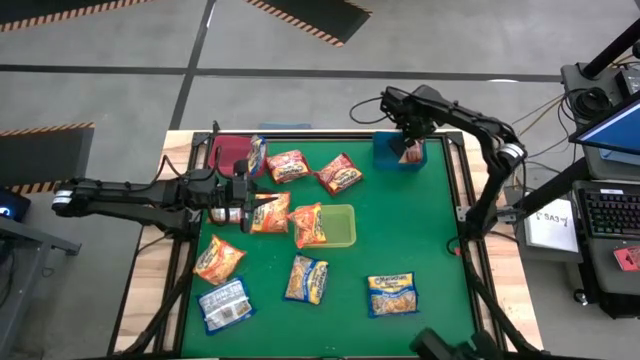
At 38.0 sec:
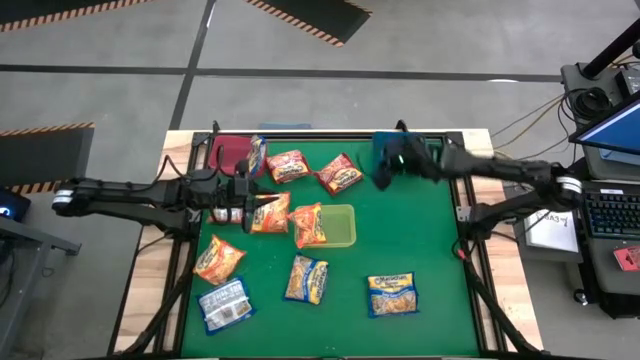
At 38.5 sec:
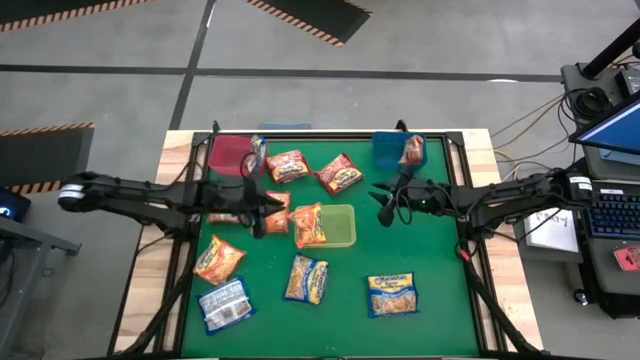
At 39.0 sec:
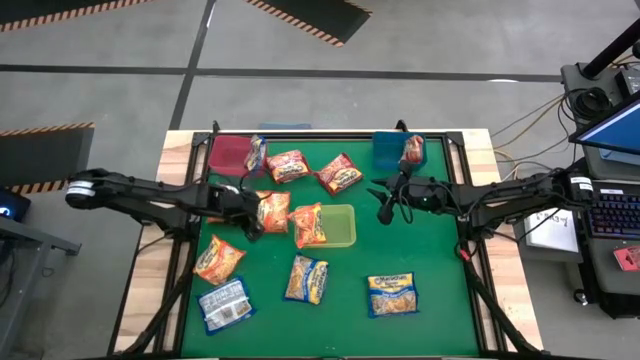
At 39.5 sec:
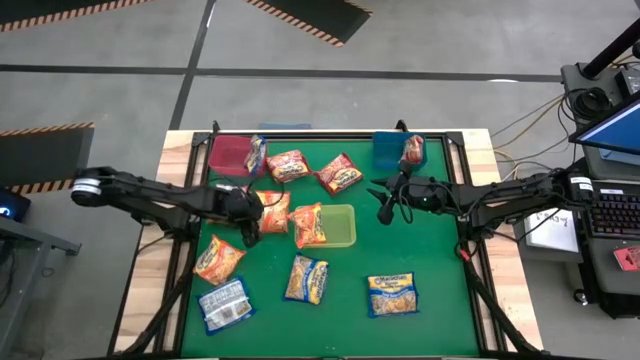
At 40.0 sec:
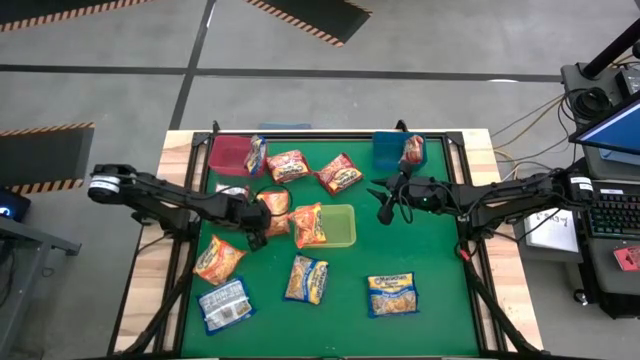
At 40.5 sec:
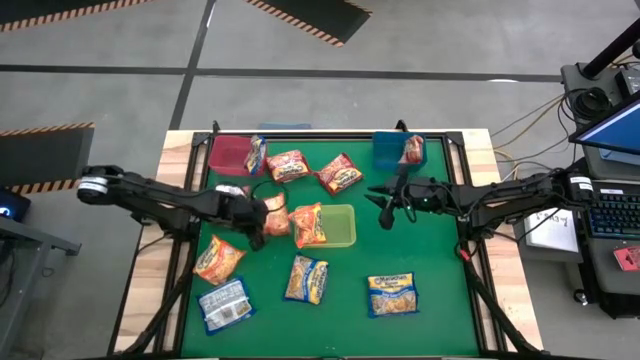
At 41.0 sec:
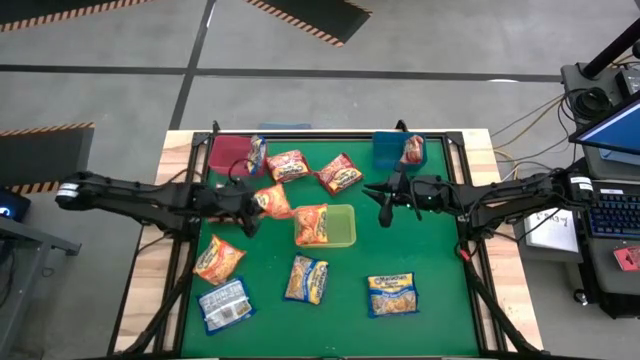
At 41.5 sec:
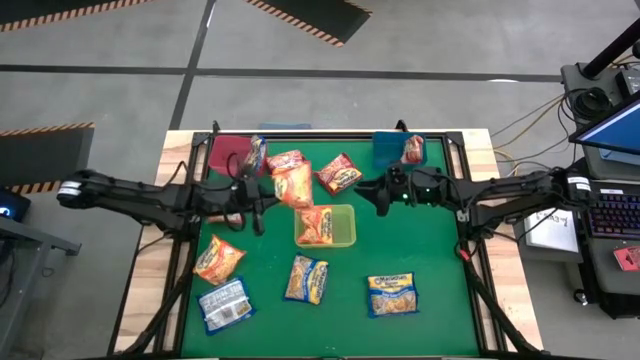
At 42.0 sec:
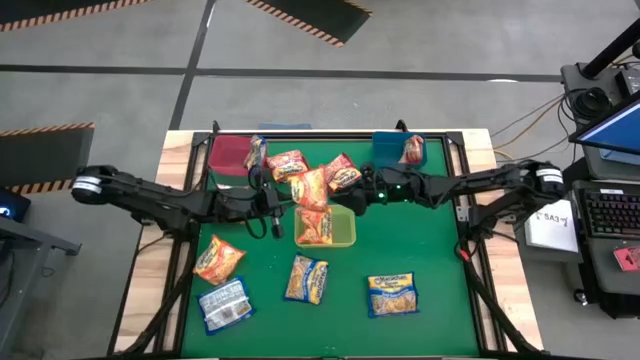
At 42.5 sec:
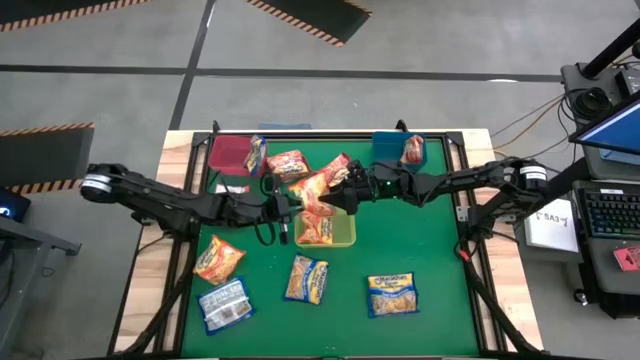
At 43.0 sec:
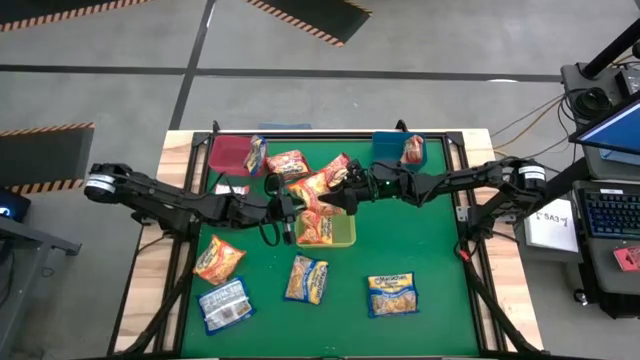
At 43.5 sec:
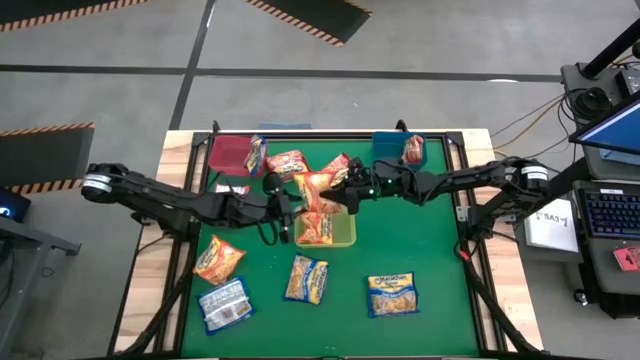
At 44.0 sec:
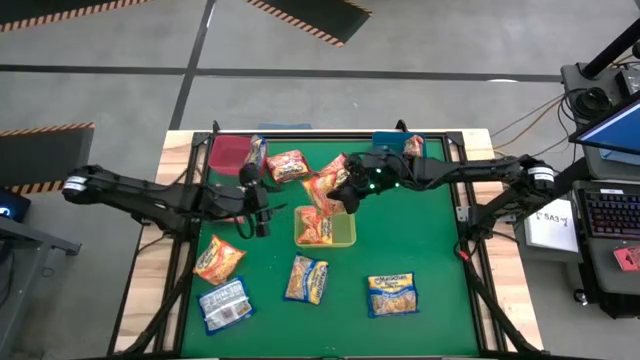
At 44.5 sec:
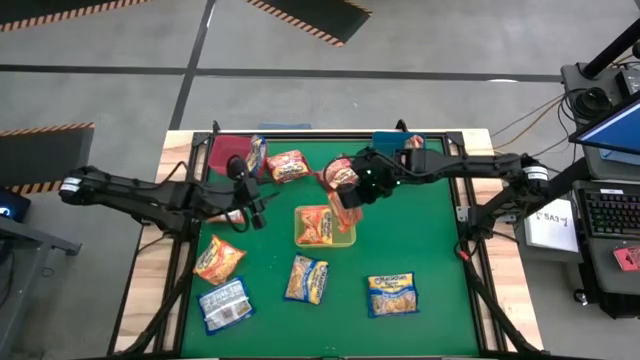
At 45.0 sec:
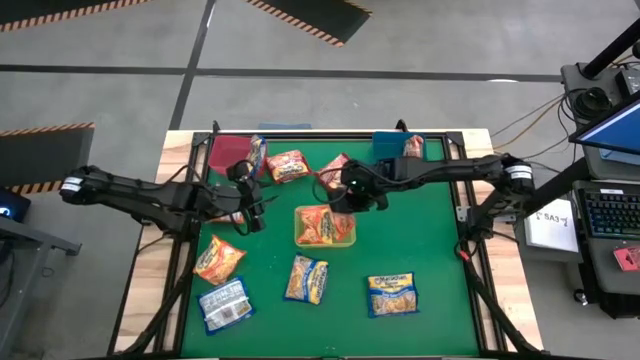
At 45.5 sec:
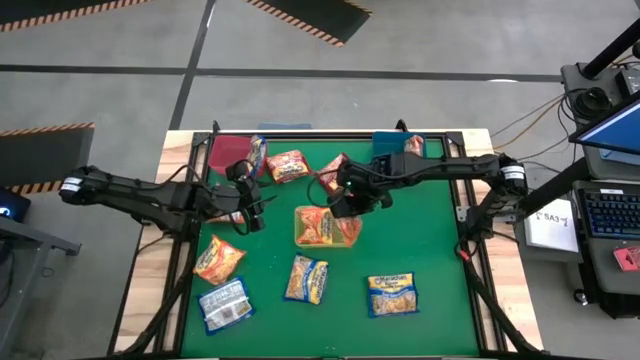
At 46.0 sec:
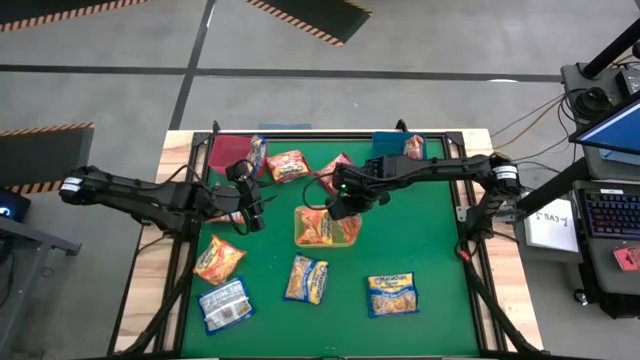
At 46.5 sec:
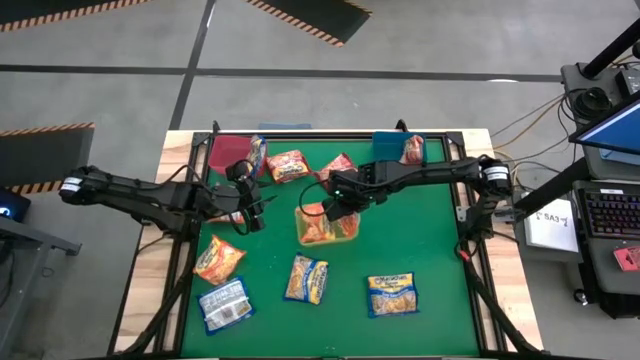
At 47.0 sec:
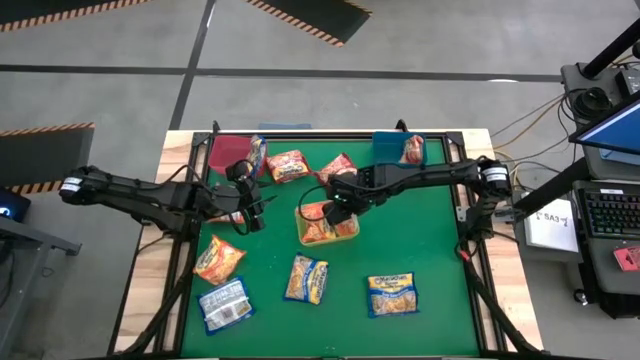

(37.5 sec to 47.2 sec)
Task: Sort Maruchan noodles
Put the orange noodle pack into the yellow bin

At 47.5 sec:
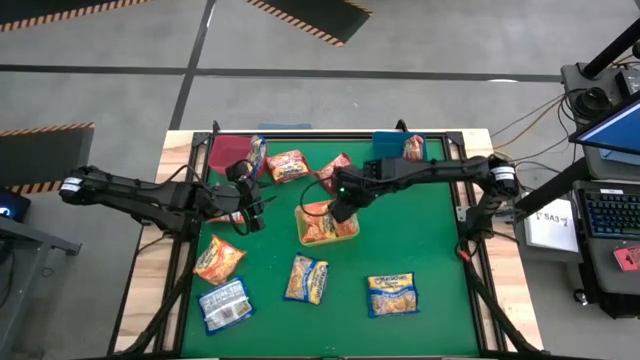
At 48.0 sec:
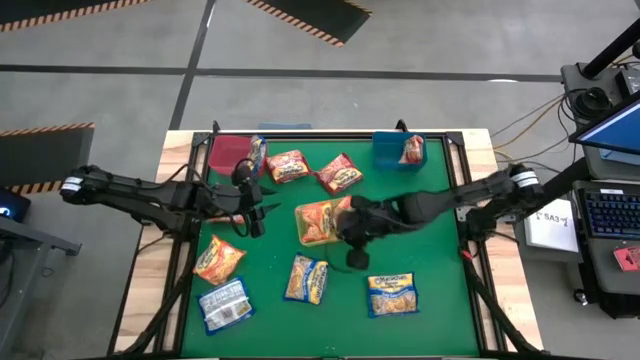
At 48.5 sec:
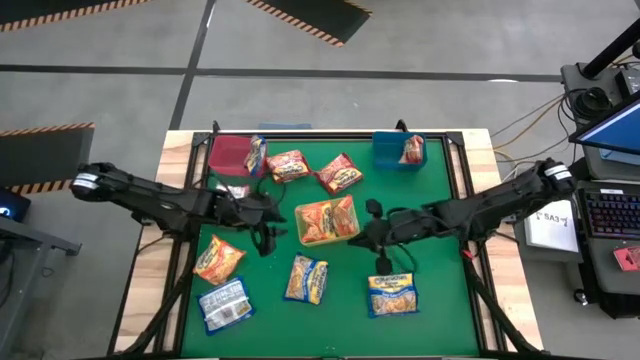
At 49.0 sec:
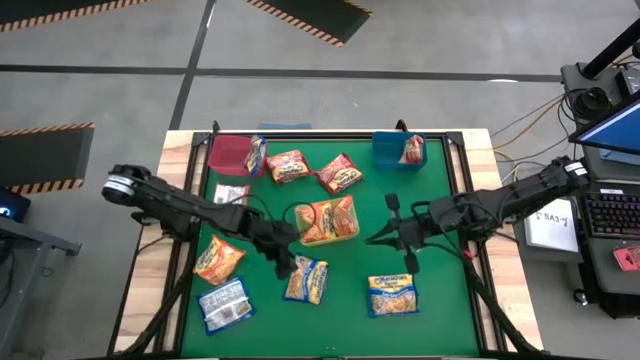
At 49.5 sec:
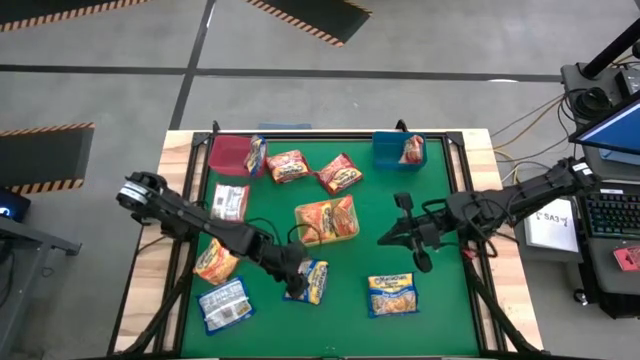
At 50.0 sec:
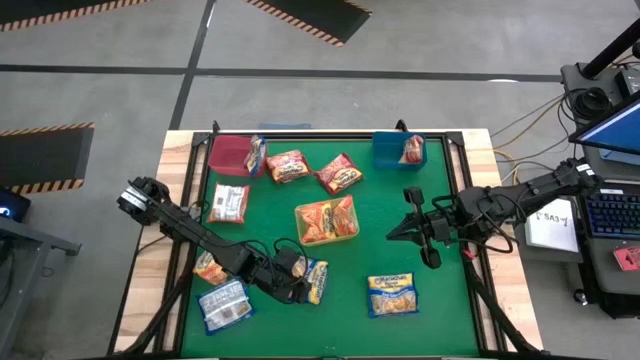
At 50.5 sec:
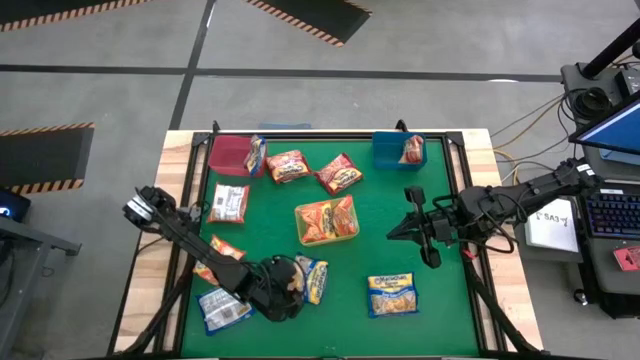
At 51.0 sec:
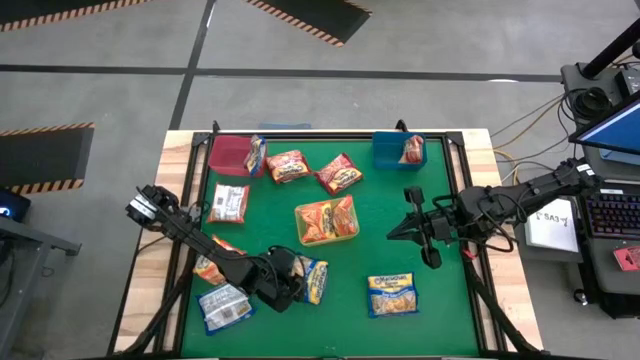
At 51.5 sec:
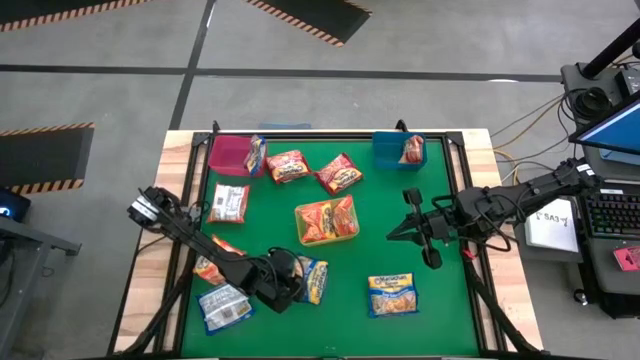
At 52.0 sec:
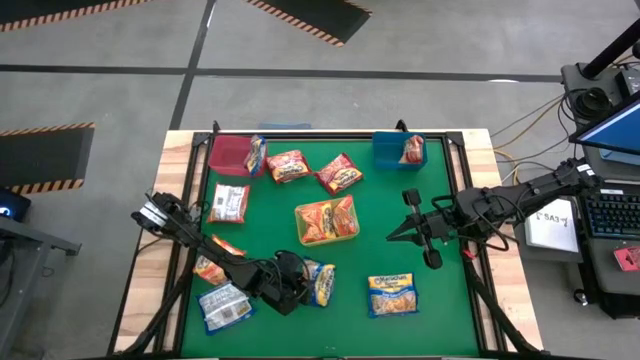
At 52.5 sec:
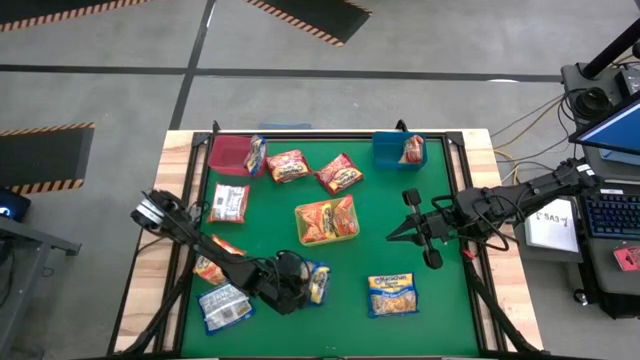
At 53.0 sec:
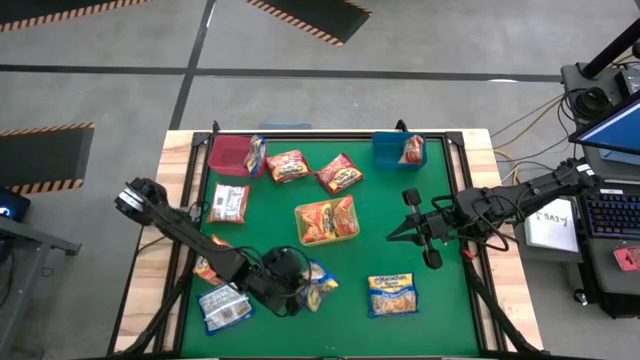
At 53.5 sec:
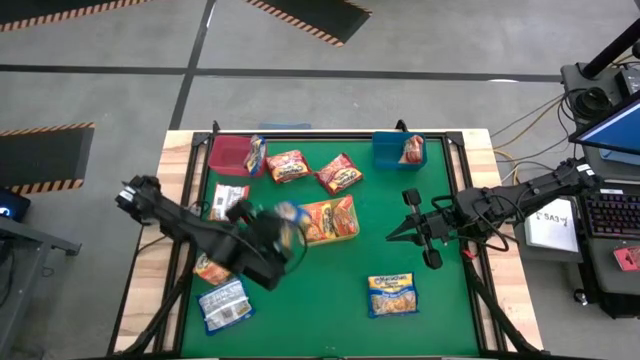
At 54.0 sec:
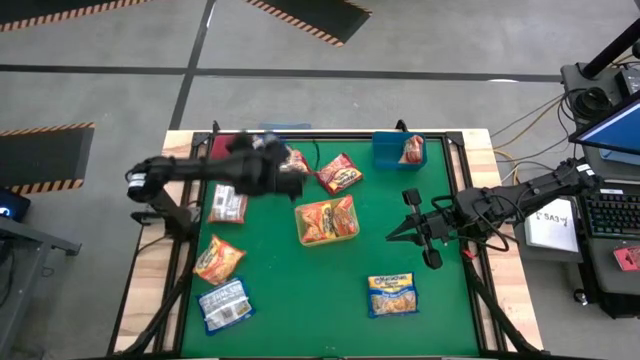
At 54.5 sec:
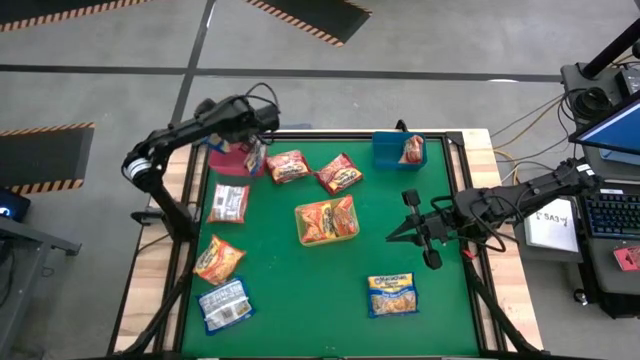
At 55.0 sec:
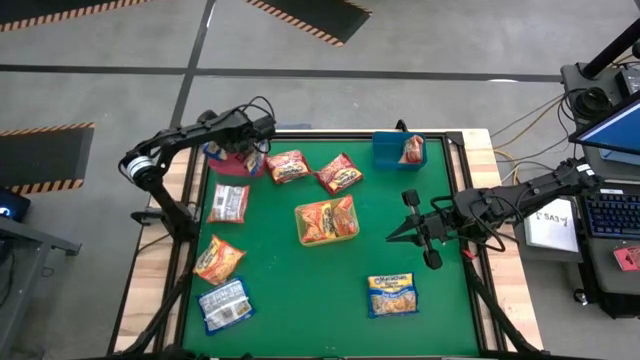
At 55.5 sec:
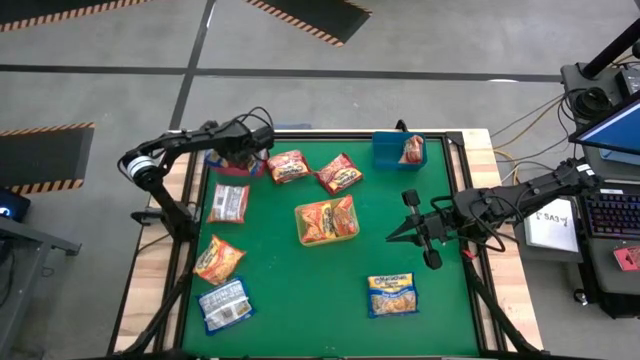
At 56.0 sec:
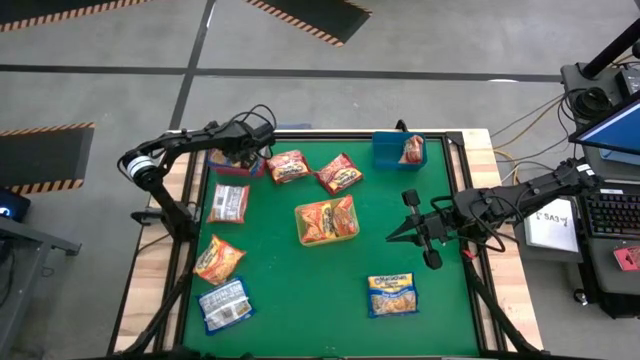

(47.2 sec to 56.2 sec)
Put the blue noodle pack into the red bin

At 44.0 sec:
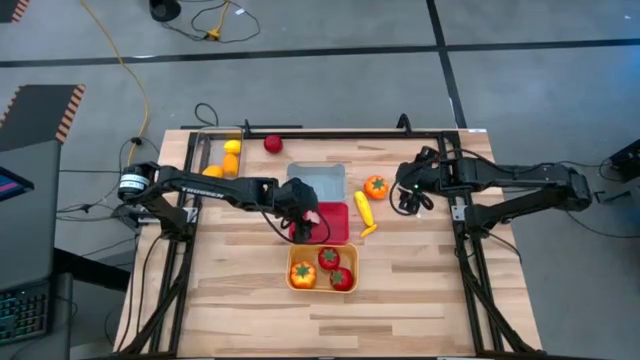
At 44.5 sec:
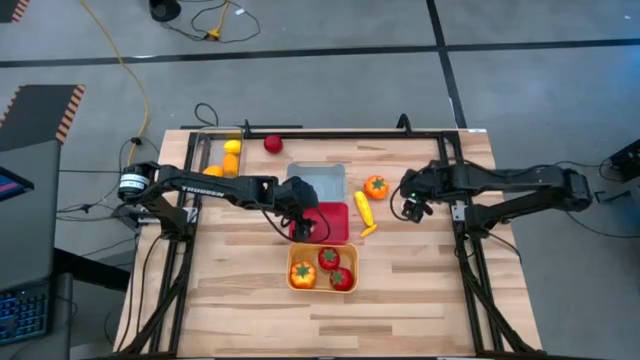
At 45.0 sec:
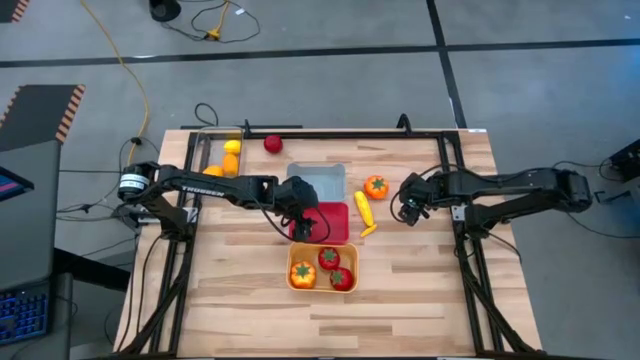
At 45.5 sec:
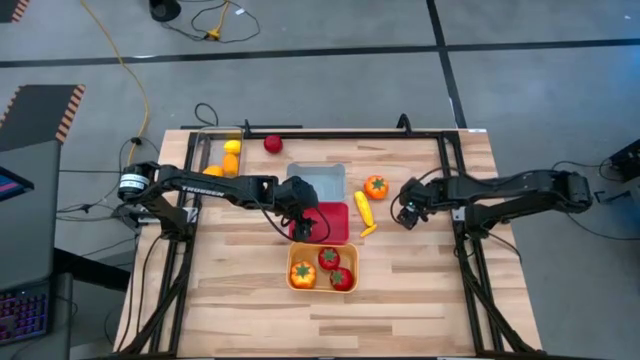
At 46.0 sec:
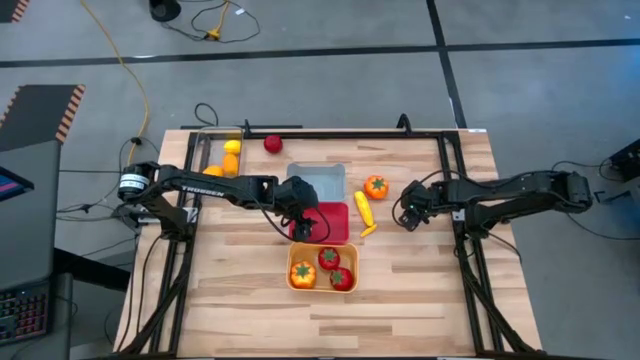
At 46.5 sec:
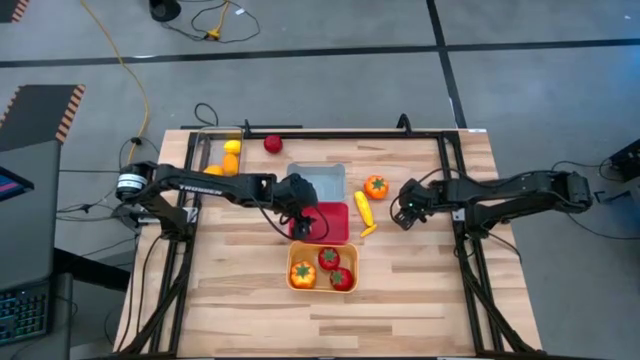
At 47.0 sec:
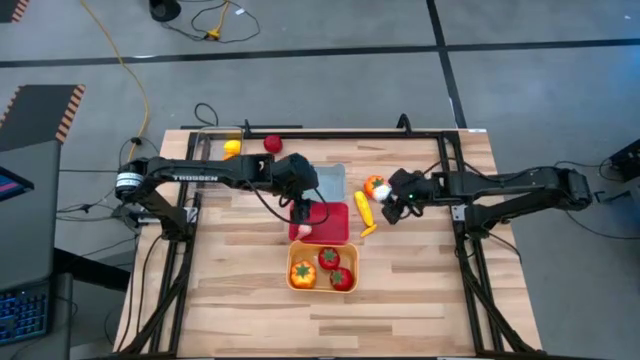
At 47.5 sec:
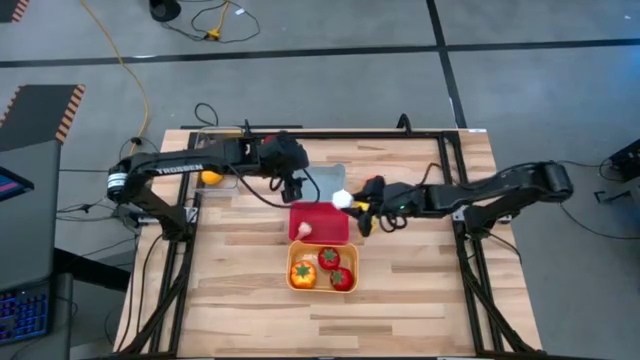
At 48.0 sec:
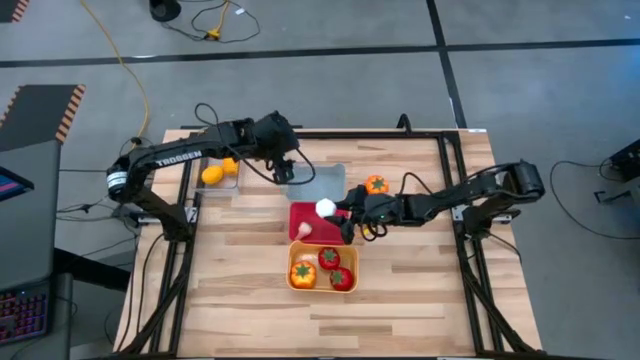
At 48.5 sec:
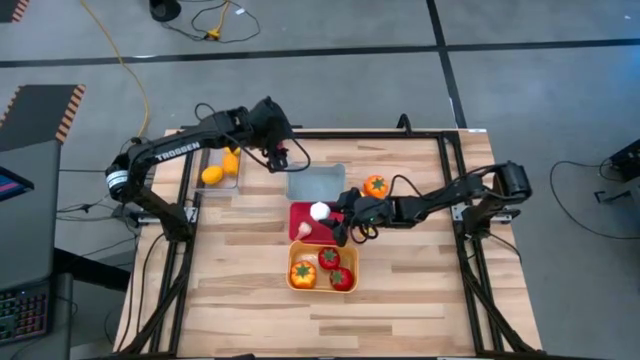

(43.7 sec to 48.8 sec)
Task: Sort produce into baskets
Put the white garlic into the red bin
